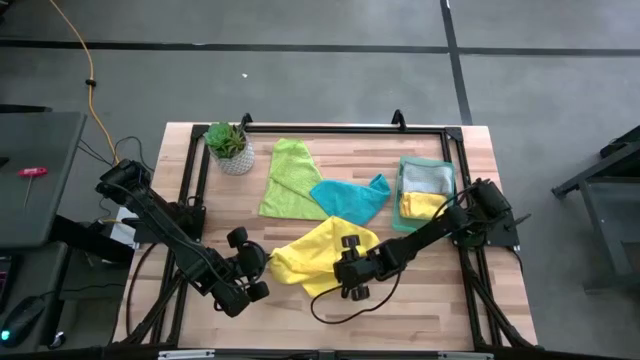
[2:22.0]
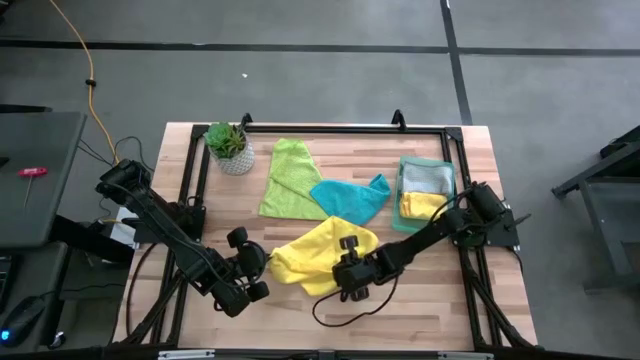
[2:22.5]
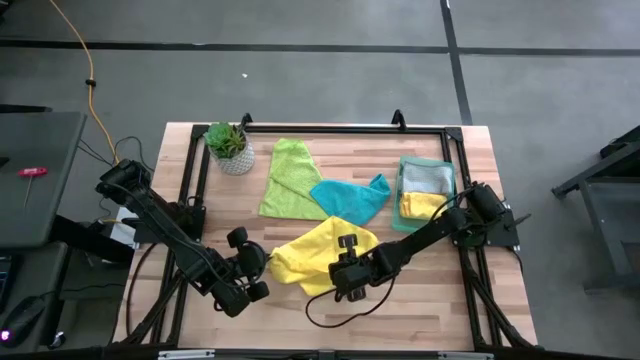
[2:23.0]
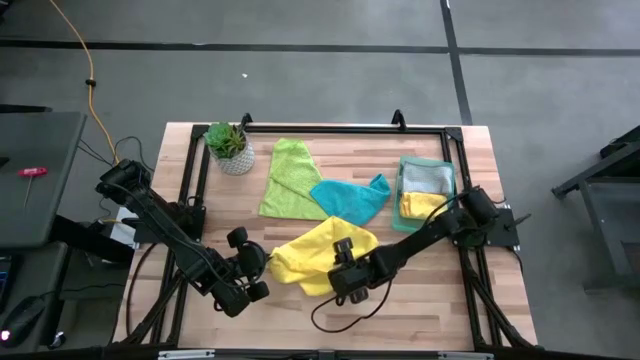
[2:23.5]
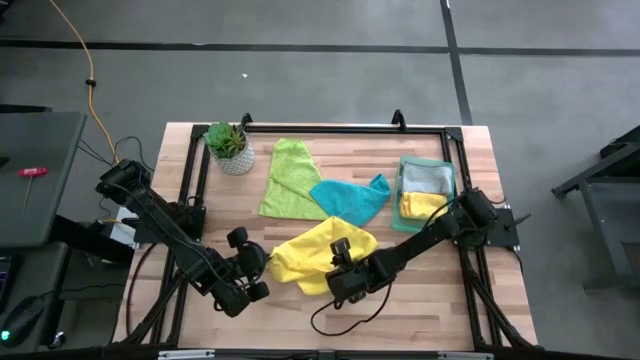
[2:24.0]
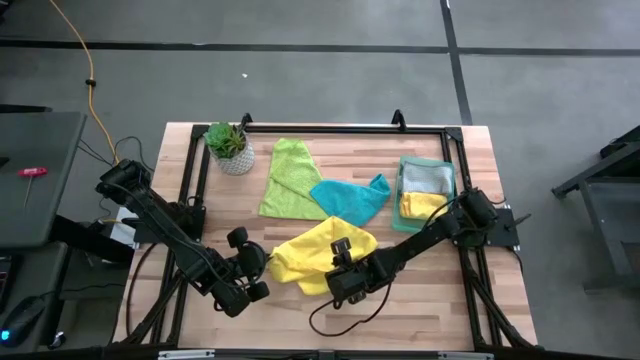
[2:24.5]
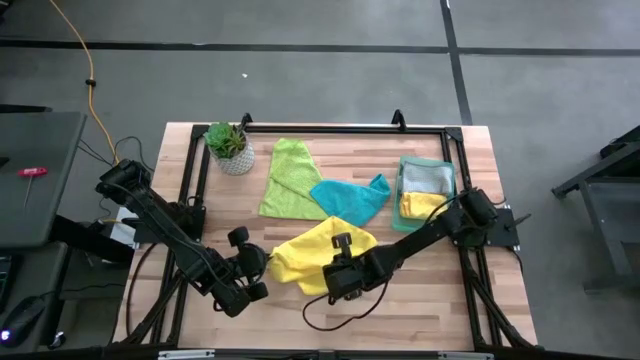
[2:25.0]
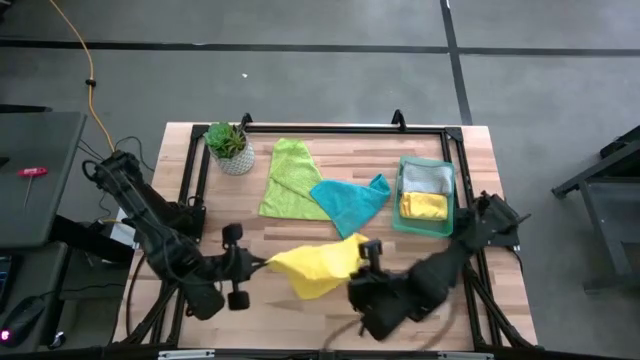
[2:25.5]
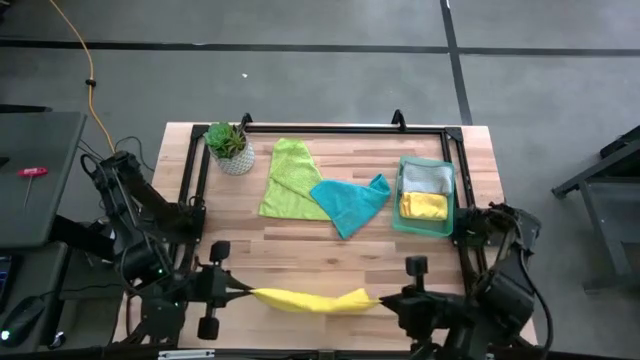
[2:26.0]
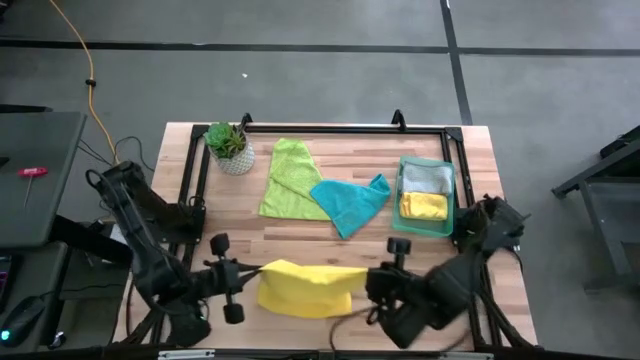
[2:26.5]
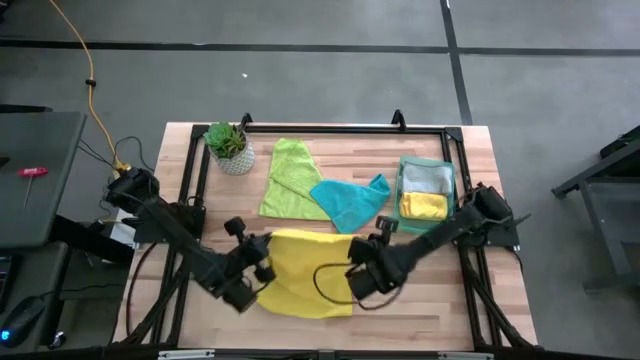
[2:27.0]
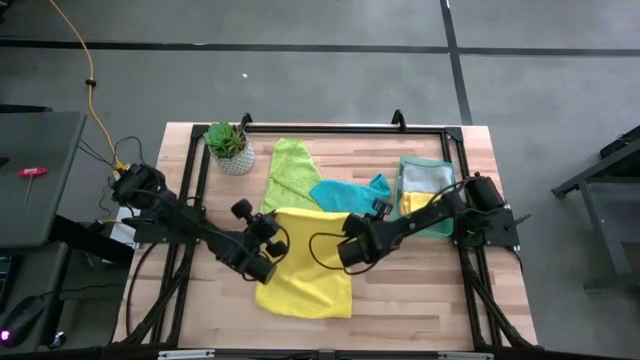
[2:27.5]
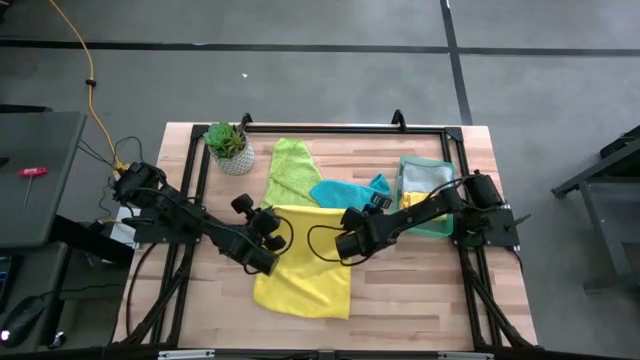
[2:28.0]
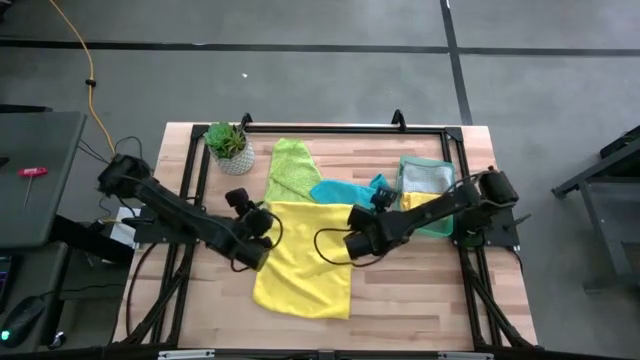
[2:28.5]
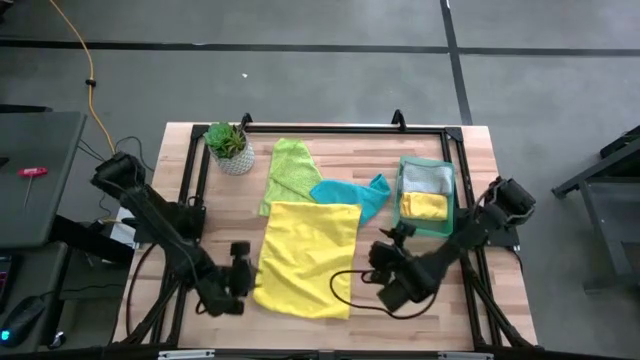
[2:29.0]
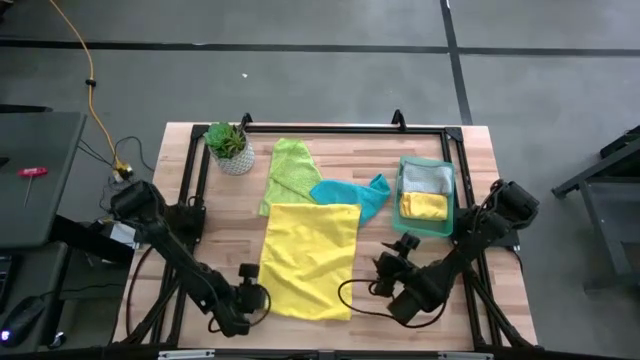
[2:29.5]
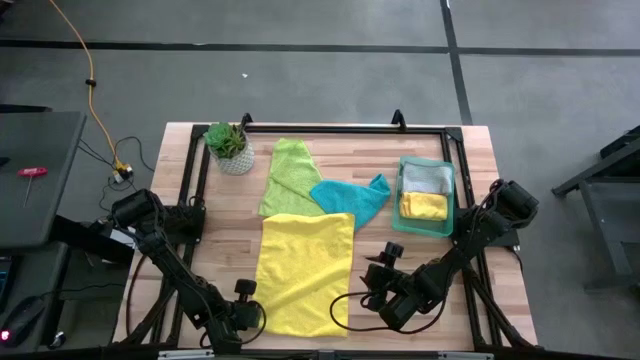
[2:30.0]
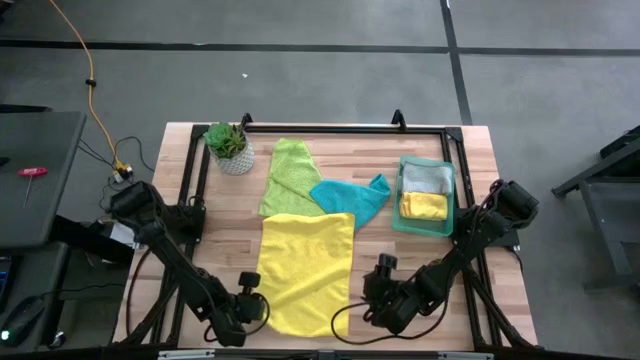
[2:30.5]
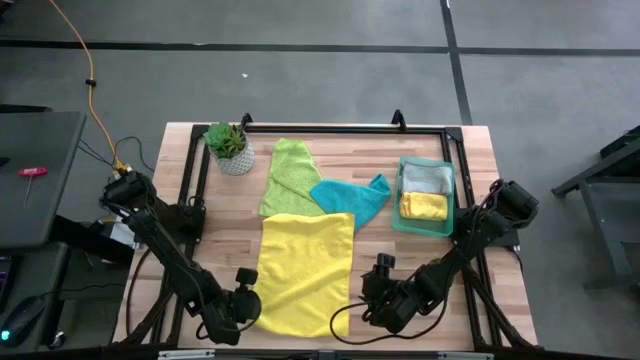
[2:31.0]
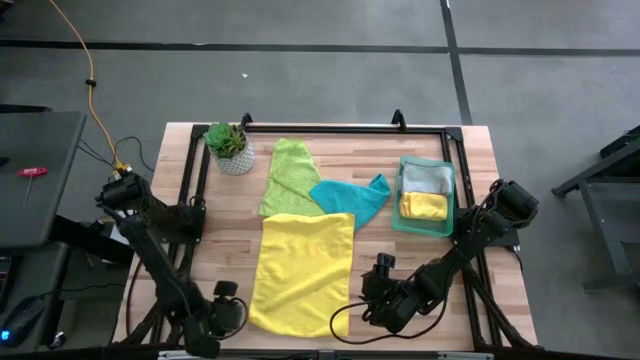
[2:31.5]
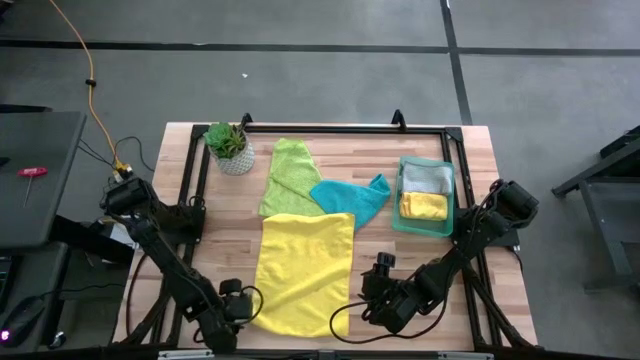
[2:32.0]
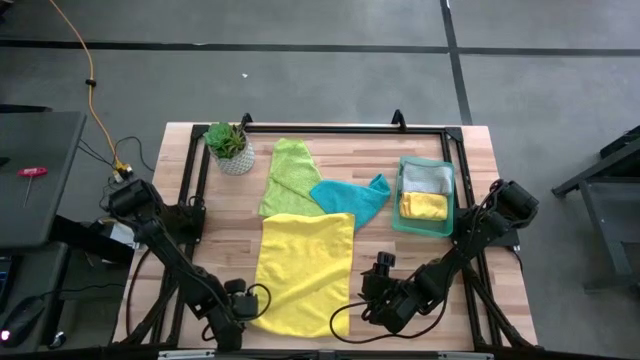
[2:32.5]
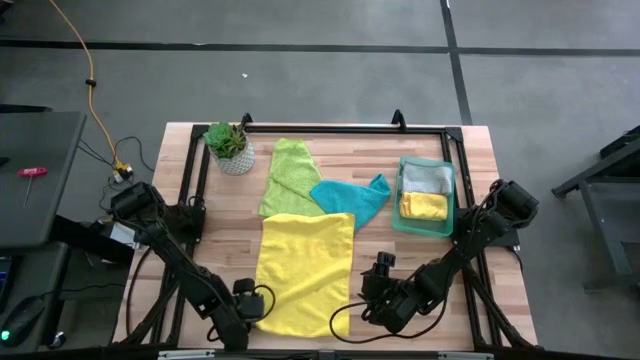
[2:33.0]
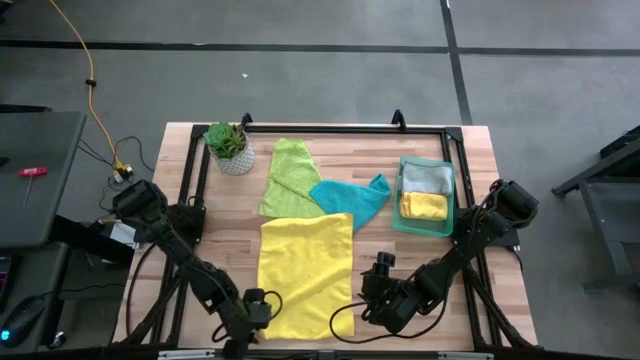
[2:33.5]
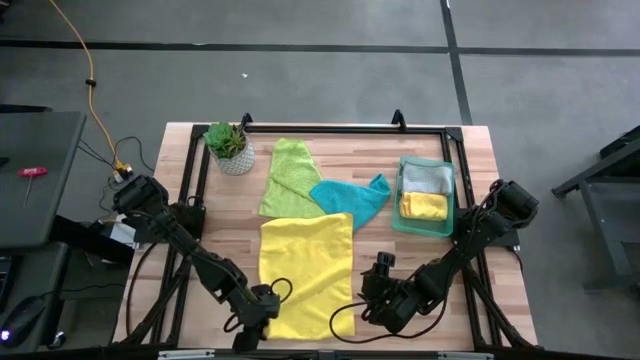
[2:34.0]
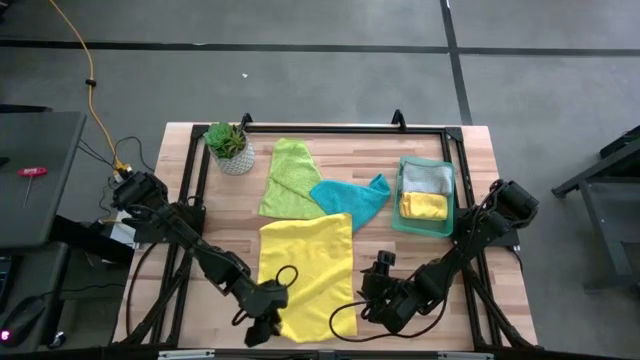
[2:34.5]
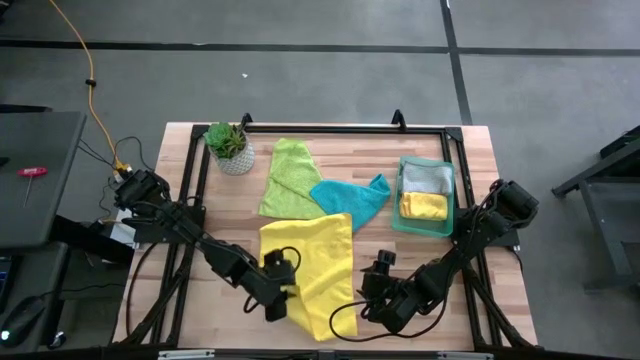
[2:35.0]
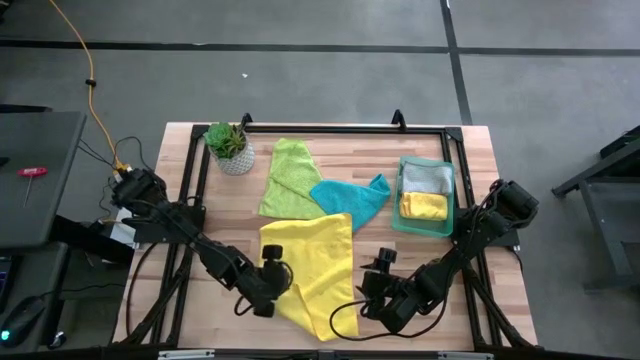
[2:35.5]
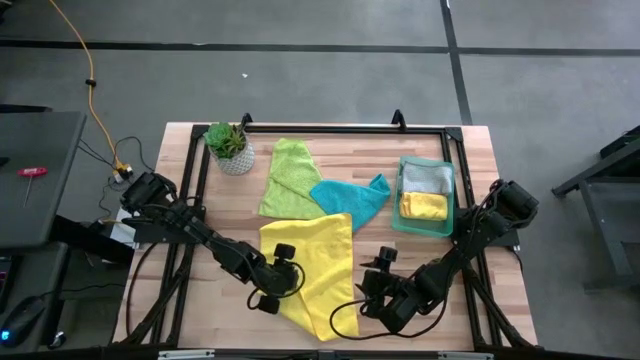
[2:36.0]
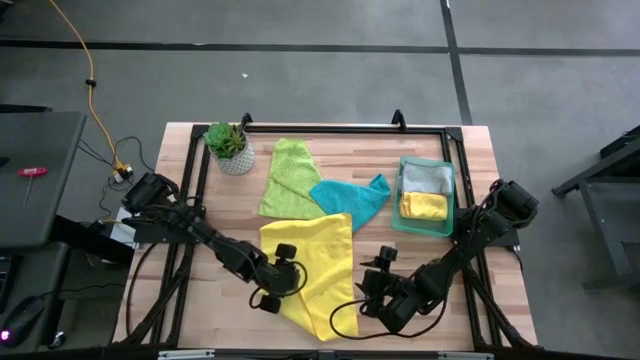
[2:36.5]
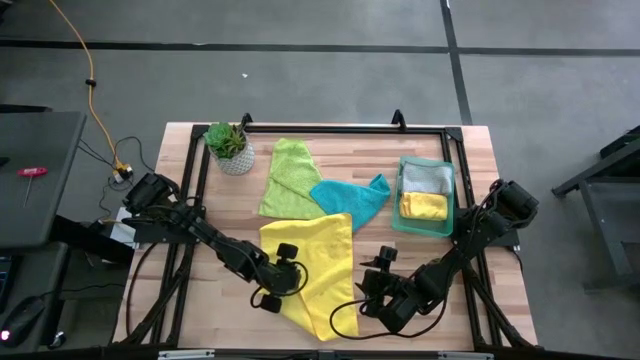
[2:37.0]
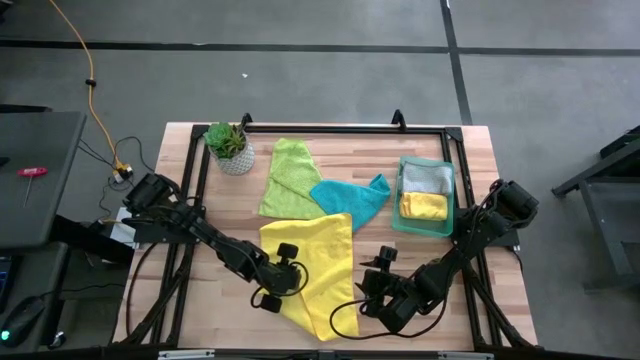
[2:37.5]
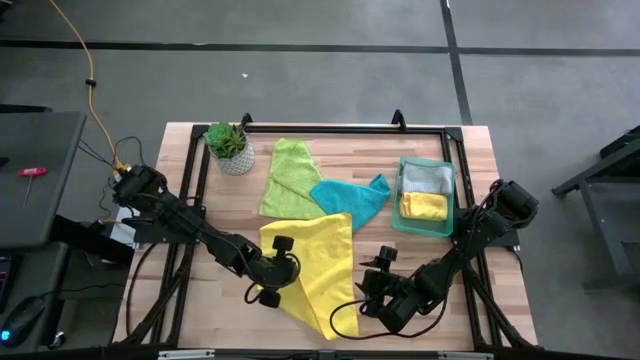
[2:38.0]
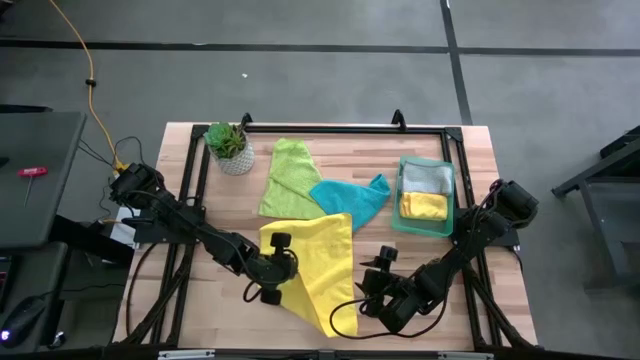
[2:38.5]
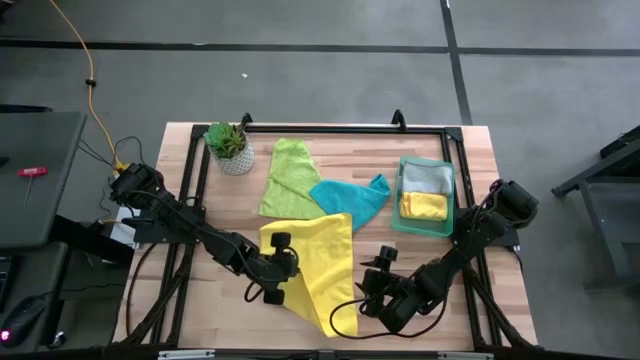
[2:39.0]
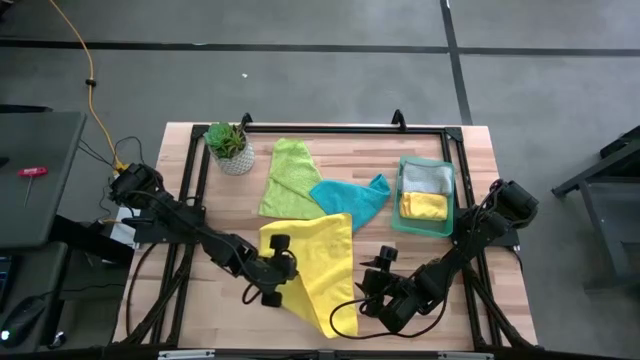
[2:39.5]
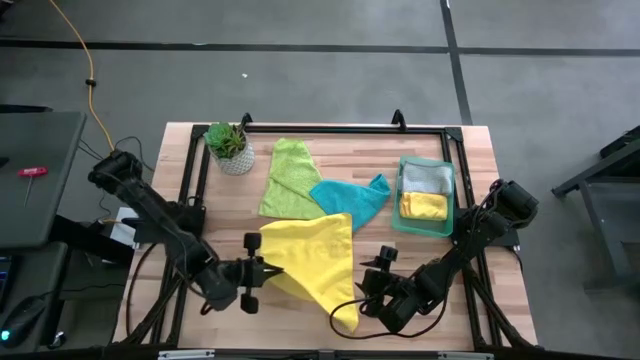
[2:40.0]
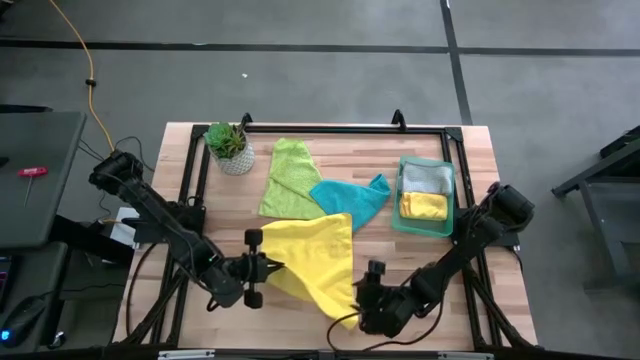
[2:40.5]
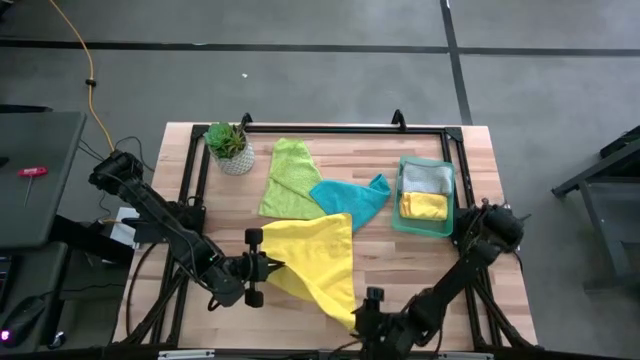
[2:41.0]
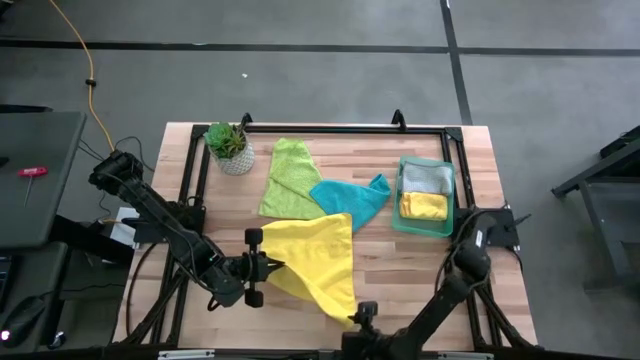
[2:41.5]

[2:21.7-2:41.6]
Task: Fold microfiber towels
Fold the yellow microfiber cloth
